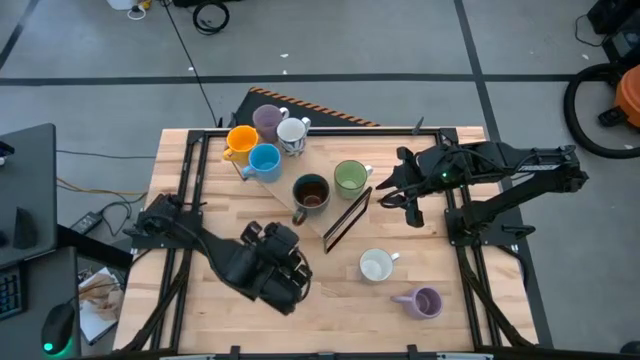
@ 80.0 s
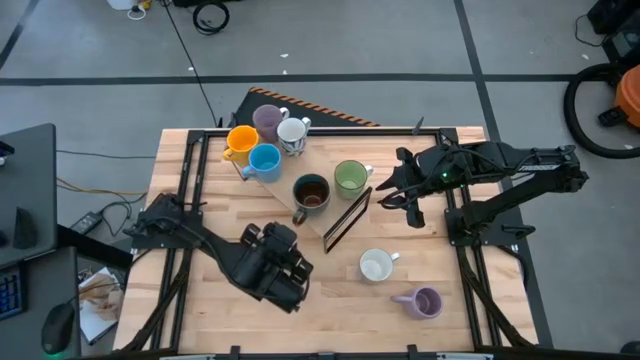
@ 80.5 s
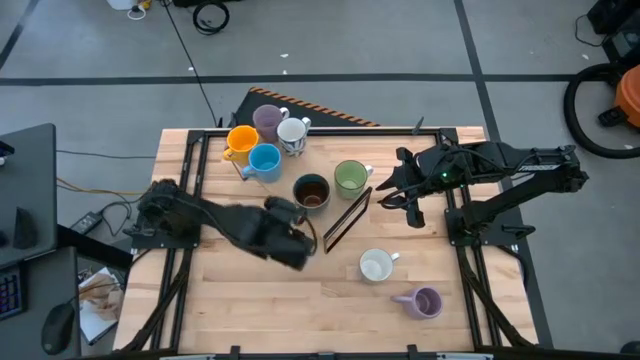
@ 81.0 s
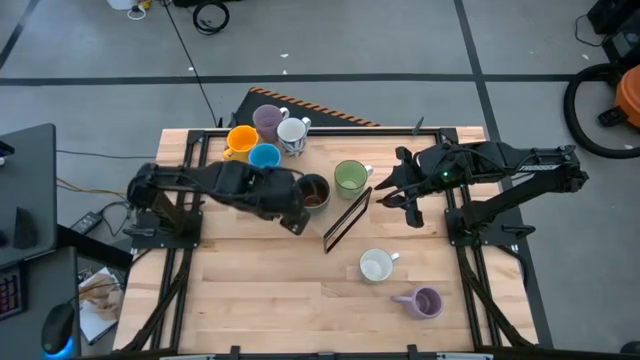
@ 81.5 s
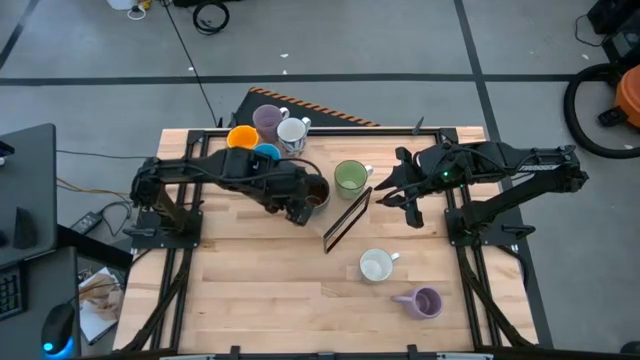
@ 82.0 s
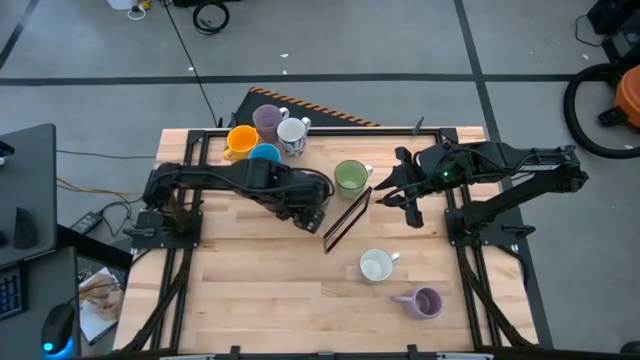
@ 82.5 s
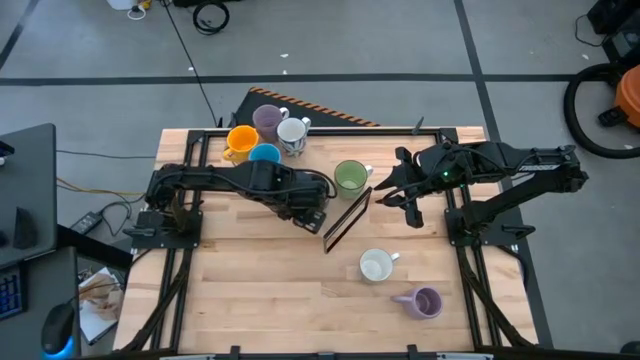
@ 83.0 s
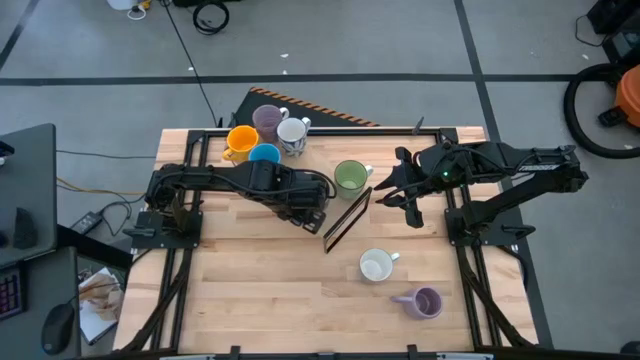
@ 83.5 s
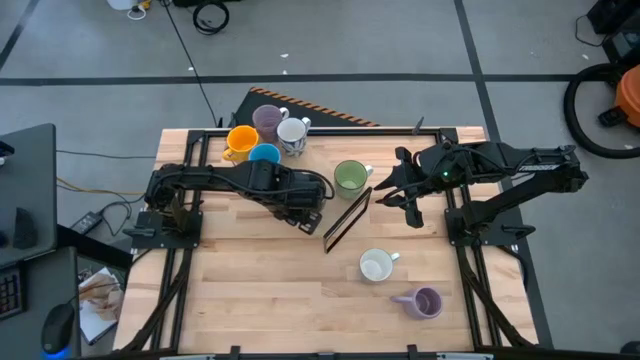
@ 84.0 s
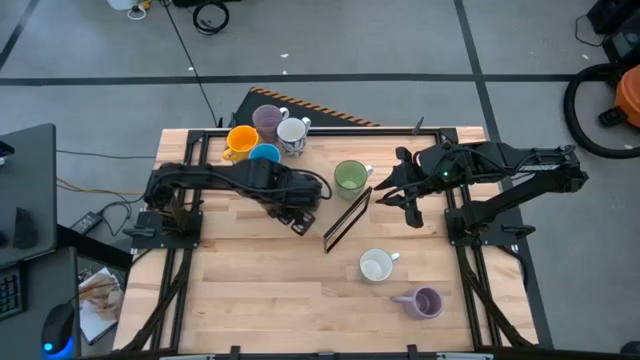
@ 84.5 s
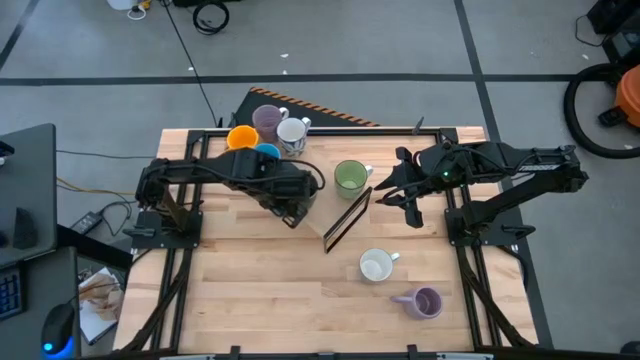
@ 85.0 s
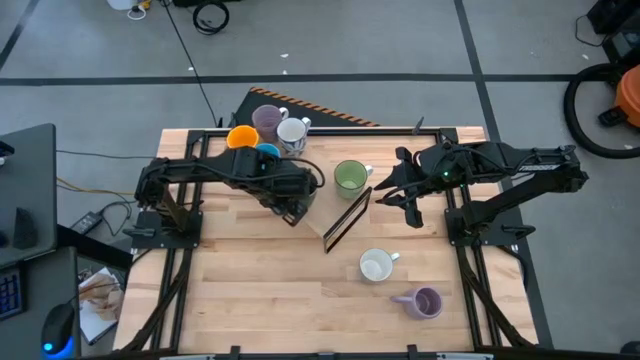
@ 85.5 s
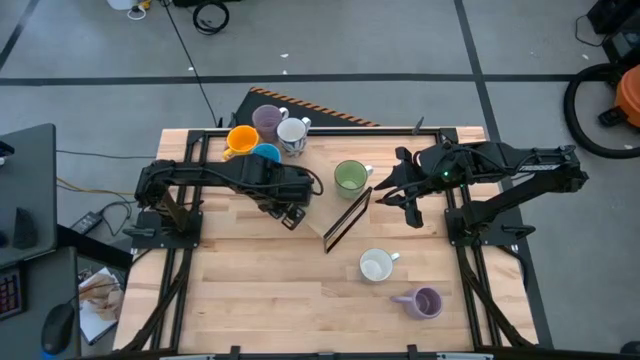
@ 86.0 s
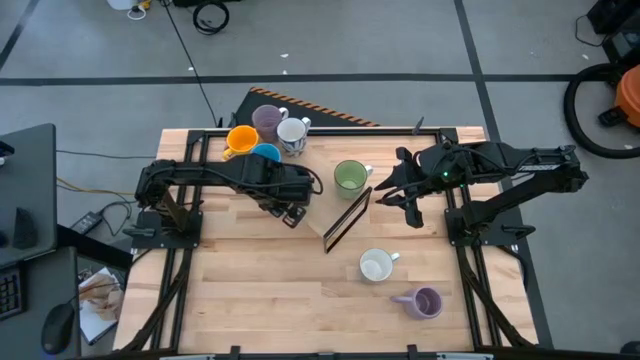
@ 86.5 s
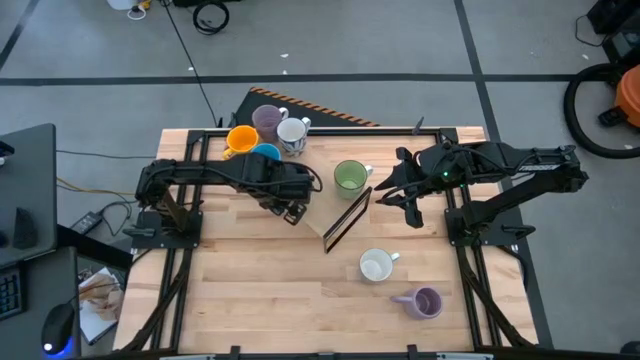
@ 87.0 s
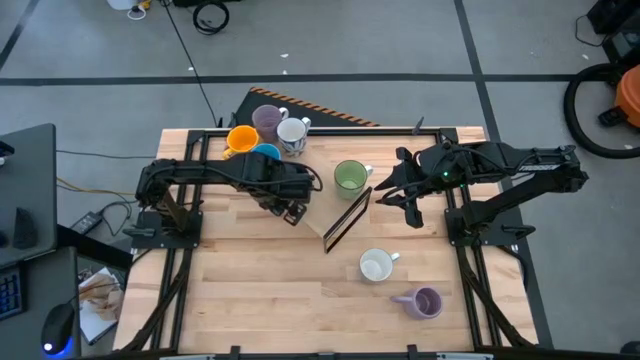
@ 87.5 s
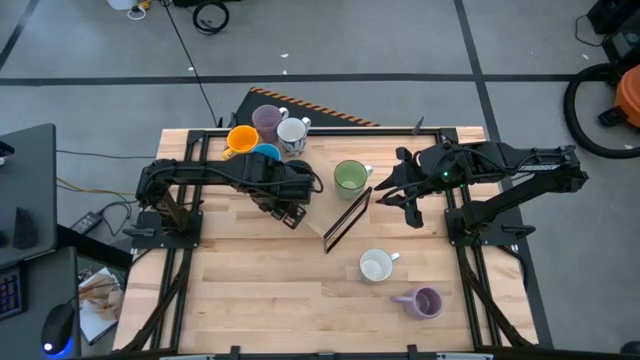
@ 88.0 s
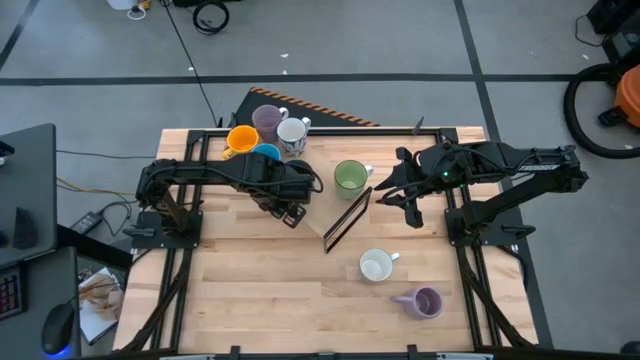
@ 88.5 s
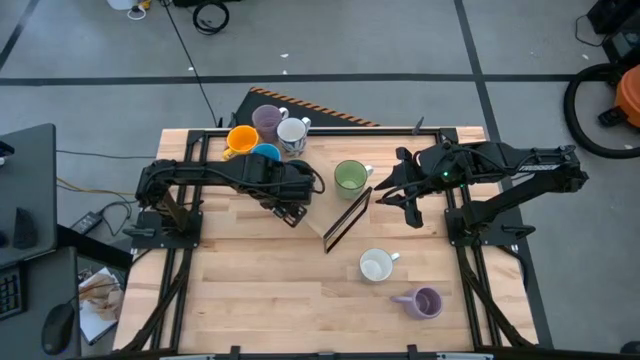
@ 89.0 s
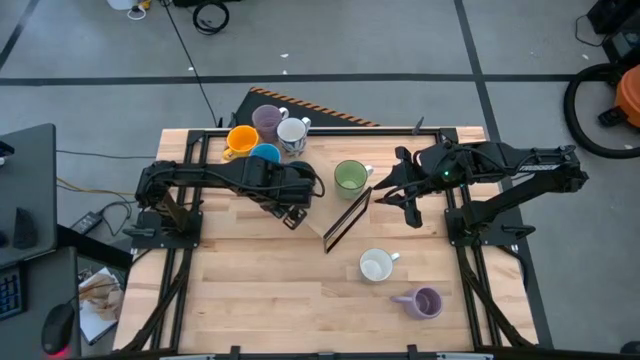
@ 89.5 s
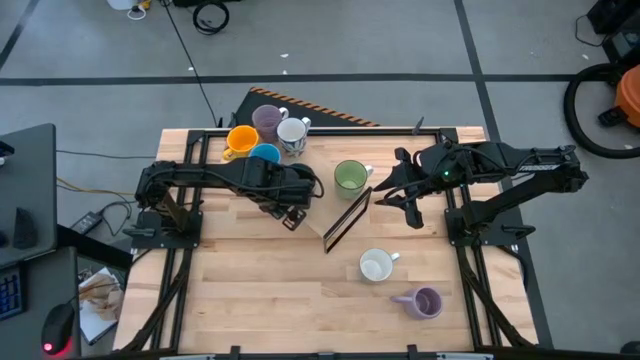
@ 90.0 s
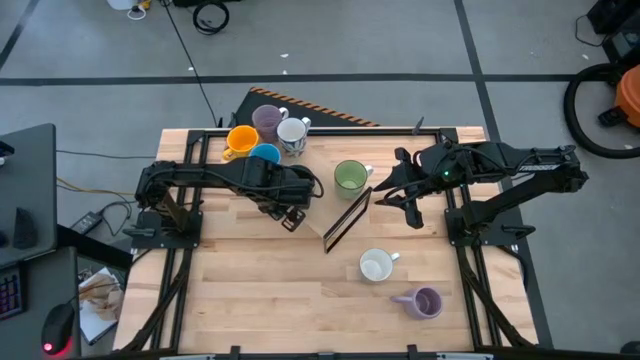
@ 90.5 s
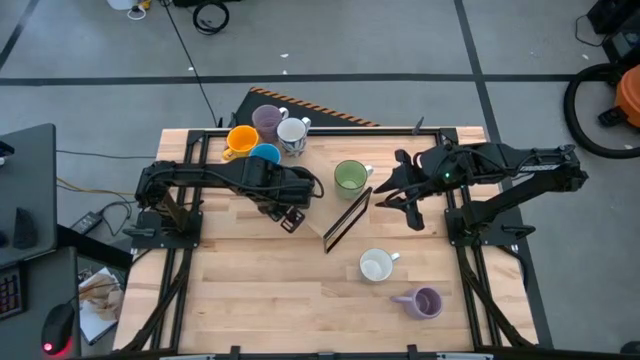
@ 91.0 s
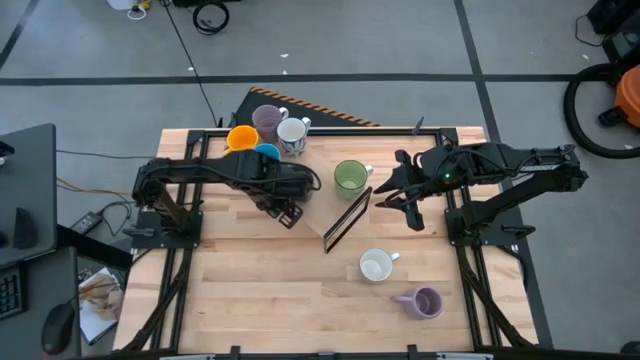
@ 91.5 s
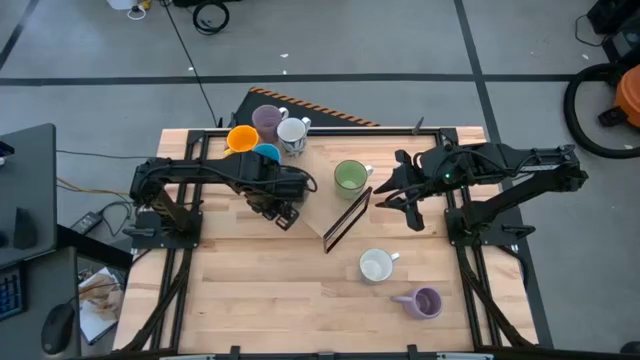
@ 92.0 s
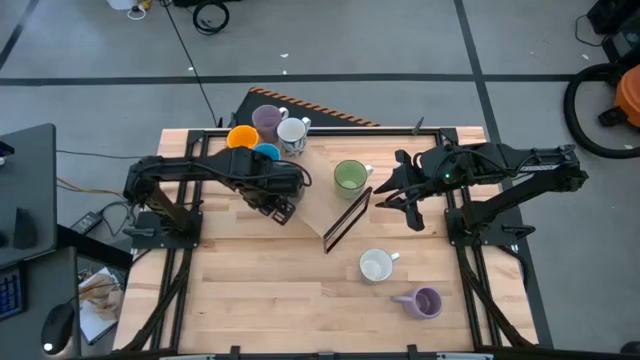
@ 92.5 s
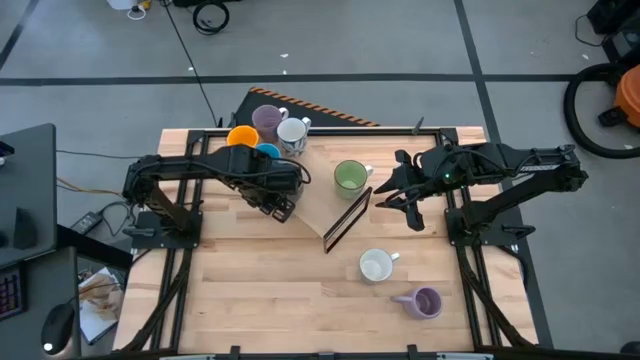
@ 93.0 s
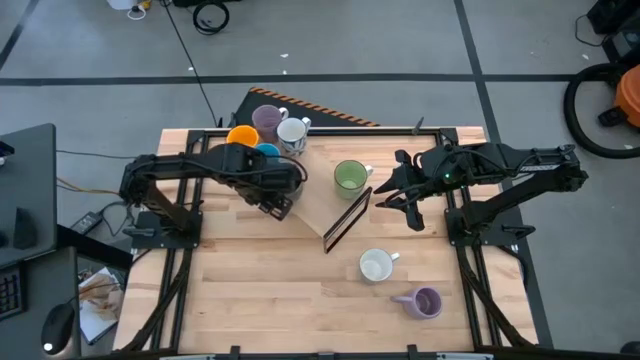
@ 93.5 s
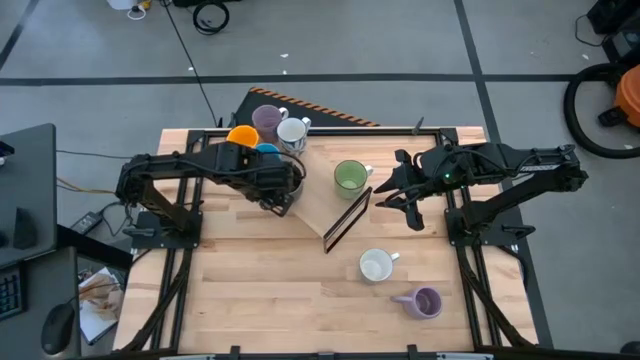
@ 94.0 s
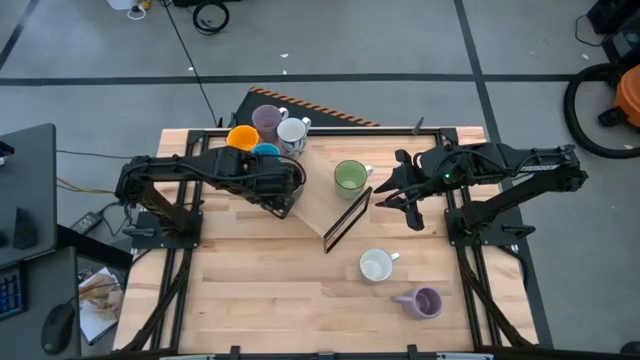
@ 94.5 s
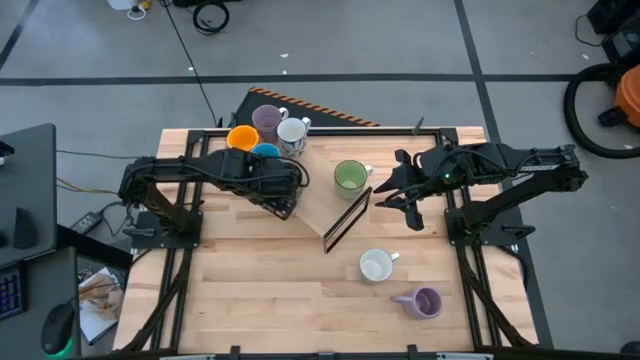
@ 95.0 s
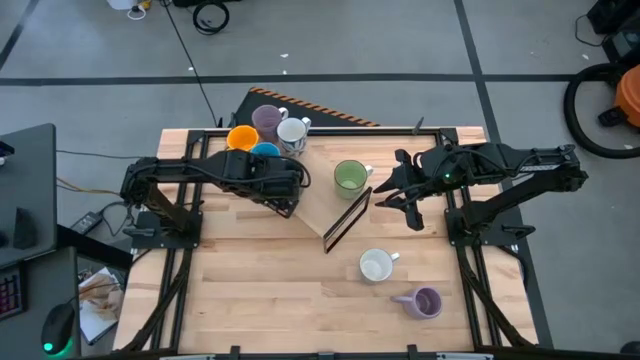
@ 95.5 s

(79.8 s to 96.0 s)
Task: Place coffee mugs
Put the brown mug on the shelf
